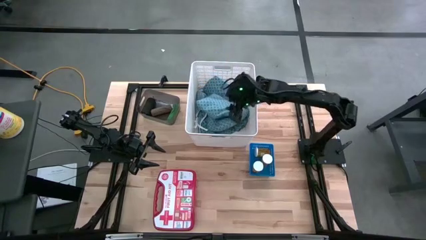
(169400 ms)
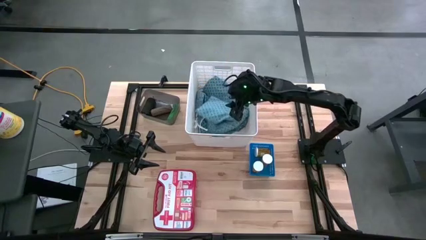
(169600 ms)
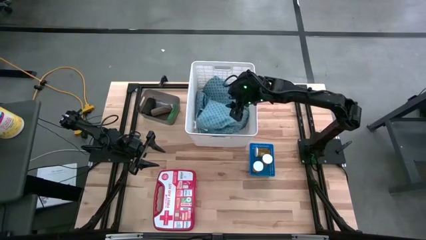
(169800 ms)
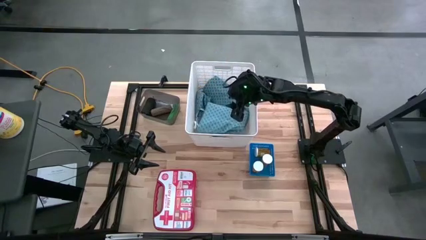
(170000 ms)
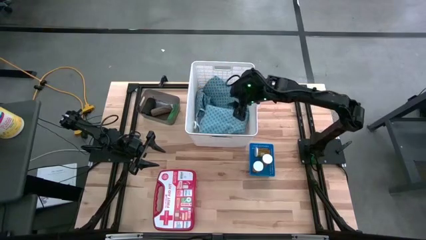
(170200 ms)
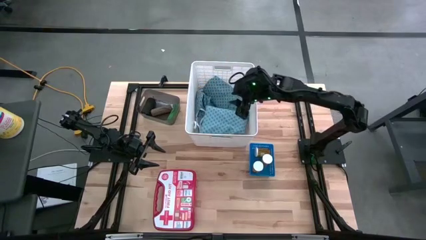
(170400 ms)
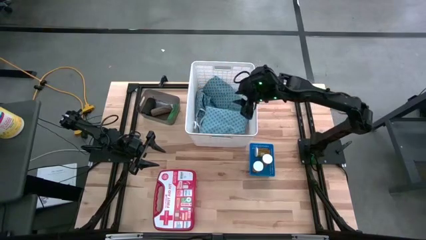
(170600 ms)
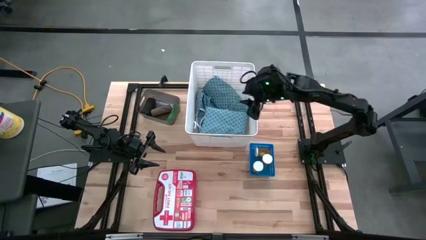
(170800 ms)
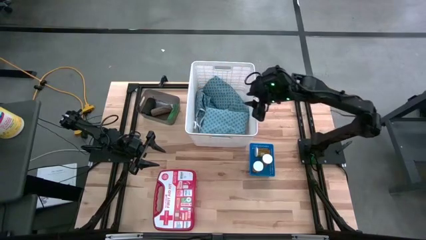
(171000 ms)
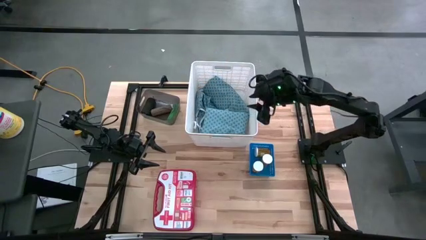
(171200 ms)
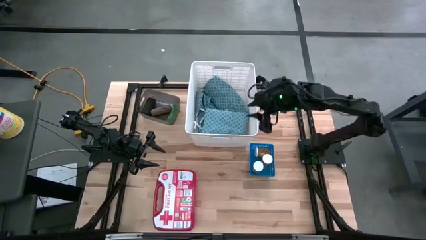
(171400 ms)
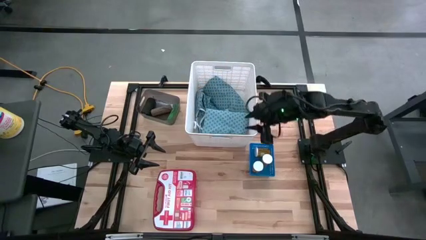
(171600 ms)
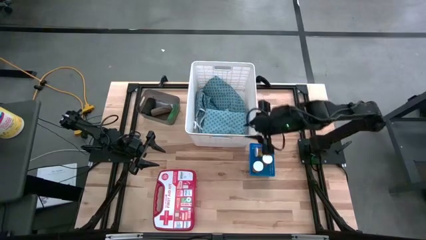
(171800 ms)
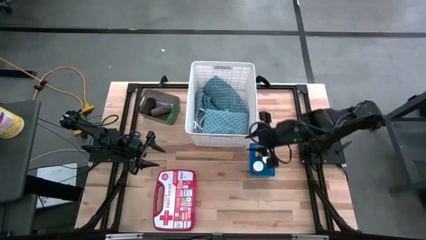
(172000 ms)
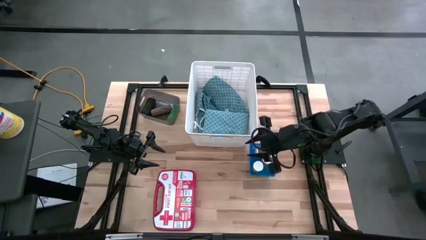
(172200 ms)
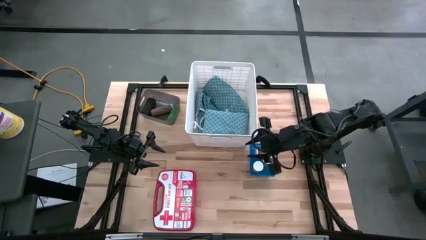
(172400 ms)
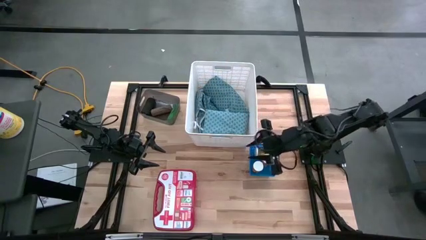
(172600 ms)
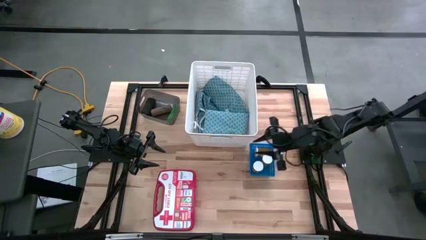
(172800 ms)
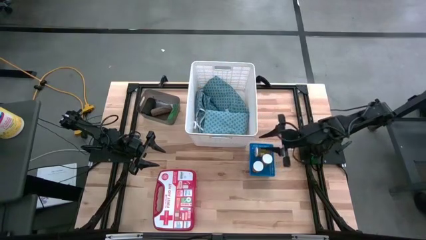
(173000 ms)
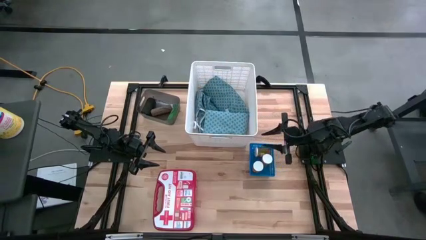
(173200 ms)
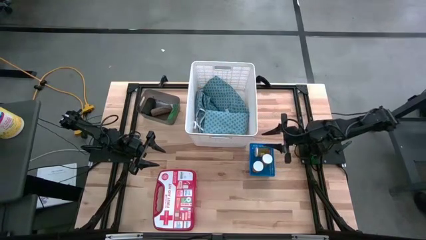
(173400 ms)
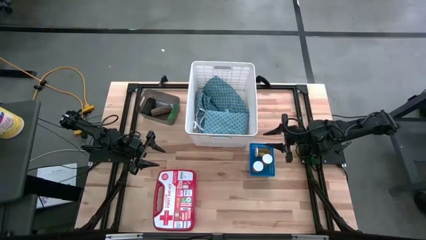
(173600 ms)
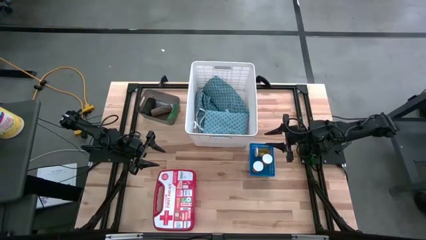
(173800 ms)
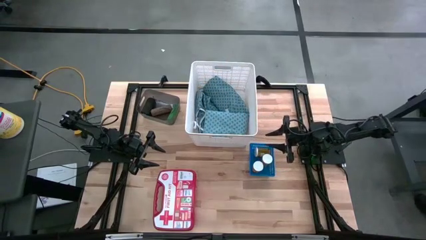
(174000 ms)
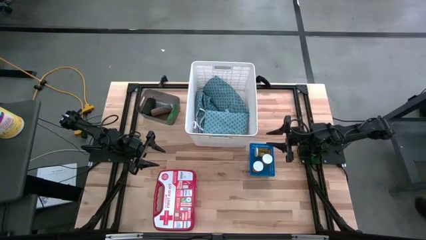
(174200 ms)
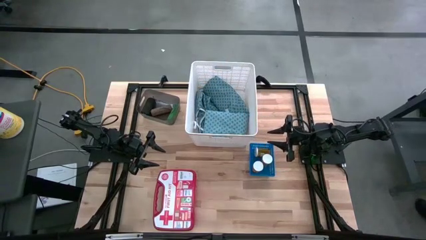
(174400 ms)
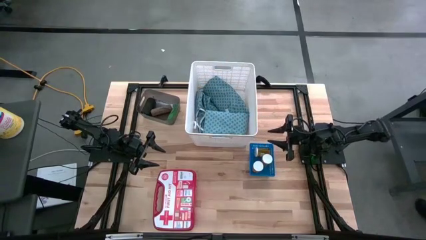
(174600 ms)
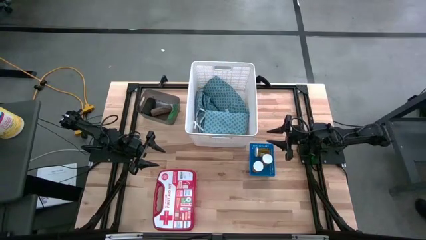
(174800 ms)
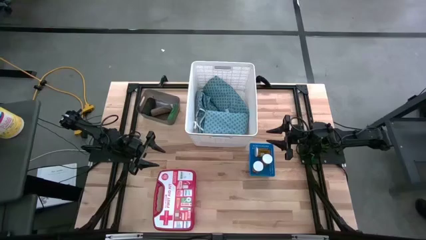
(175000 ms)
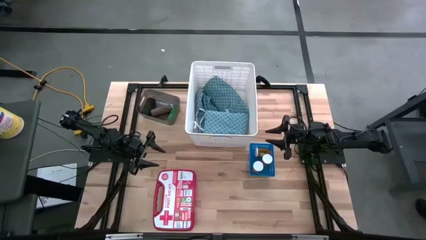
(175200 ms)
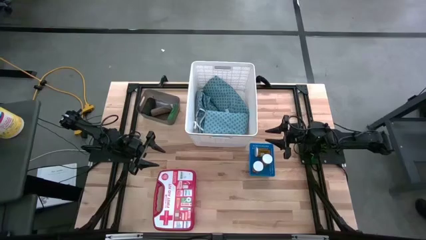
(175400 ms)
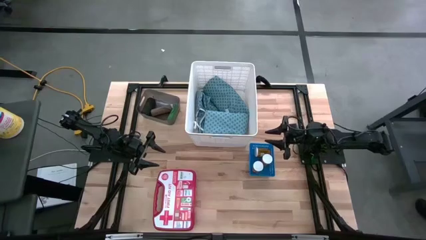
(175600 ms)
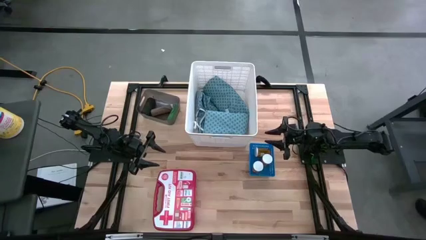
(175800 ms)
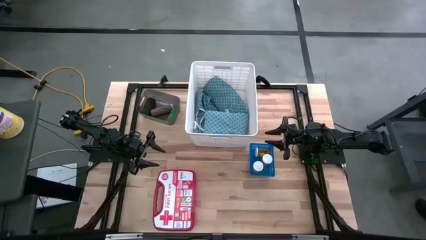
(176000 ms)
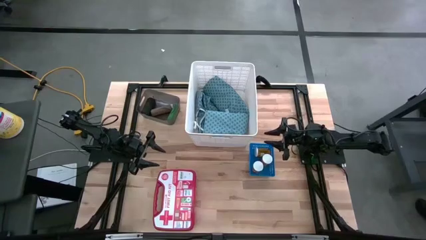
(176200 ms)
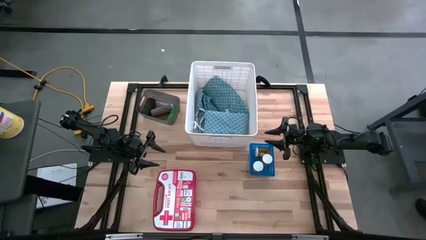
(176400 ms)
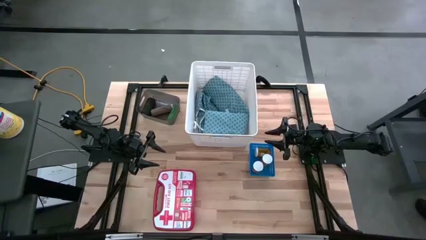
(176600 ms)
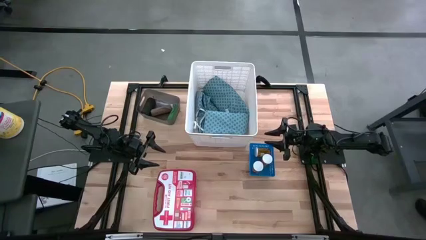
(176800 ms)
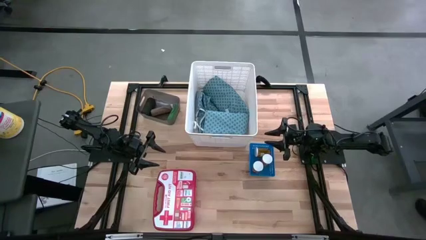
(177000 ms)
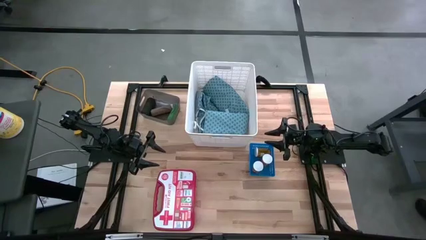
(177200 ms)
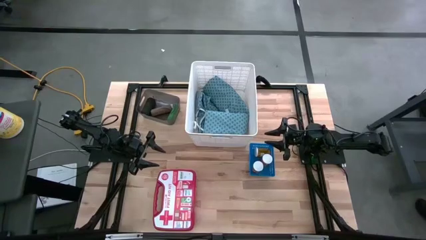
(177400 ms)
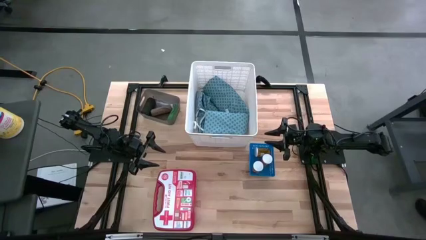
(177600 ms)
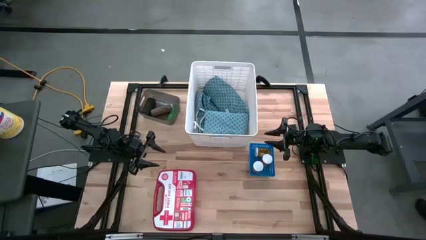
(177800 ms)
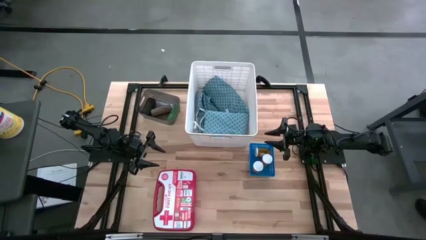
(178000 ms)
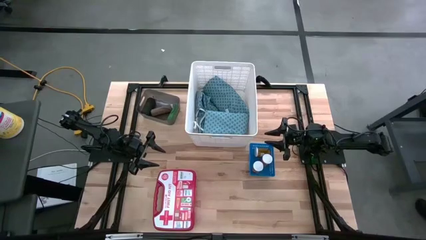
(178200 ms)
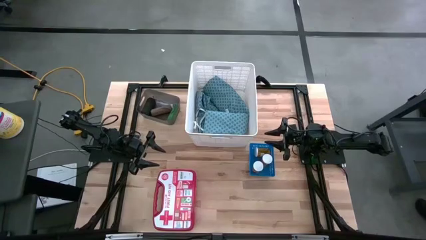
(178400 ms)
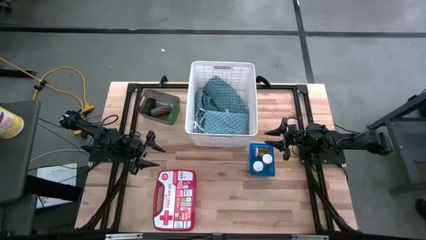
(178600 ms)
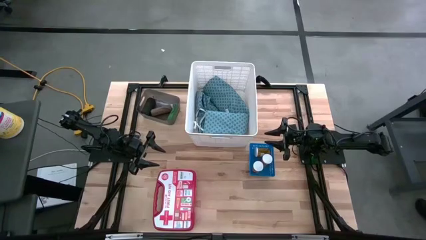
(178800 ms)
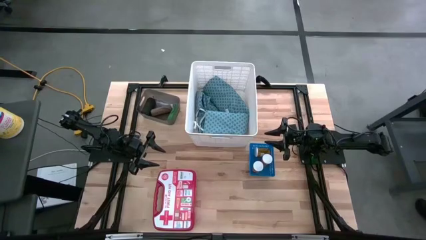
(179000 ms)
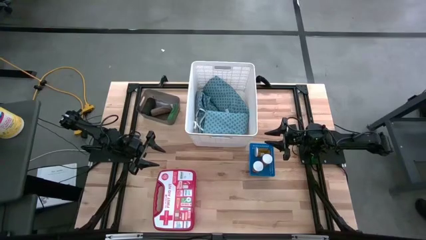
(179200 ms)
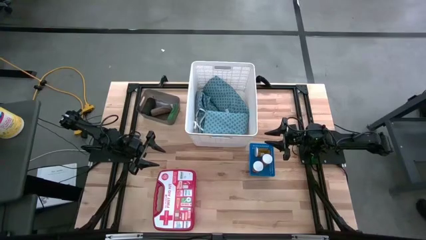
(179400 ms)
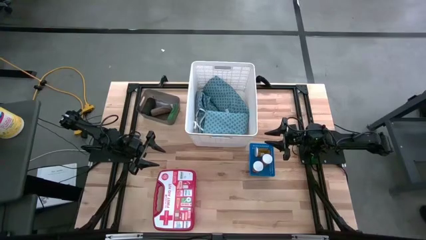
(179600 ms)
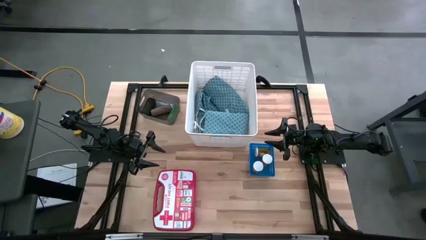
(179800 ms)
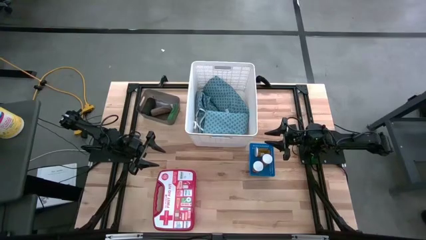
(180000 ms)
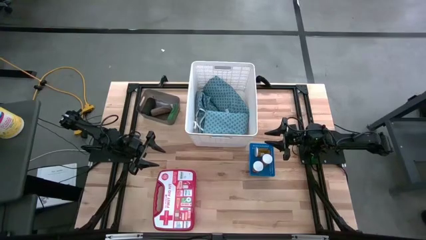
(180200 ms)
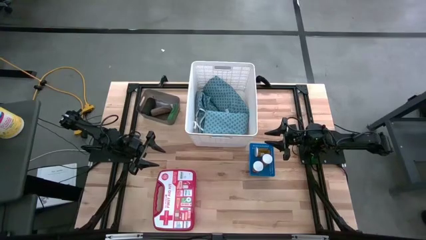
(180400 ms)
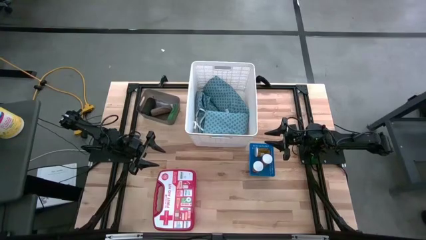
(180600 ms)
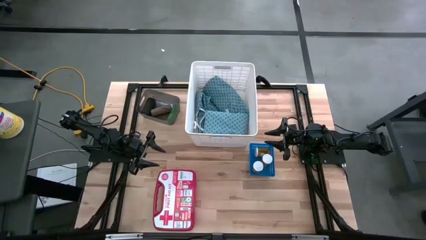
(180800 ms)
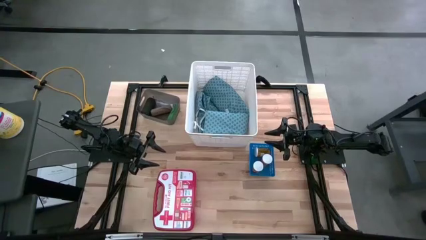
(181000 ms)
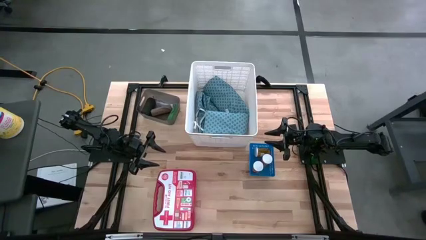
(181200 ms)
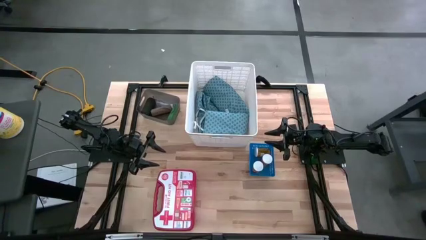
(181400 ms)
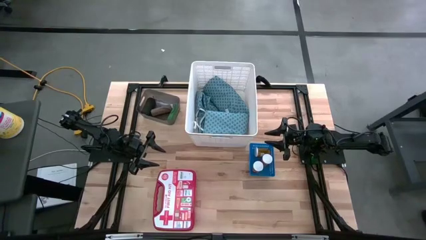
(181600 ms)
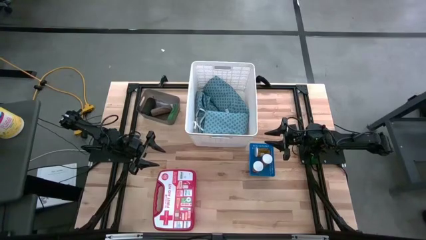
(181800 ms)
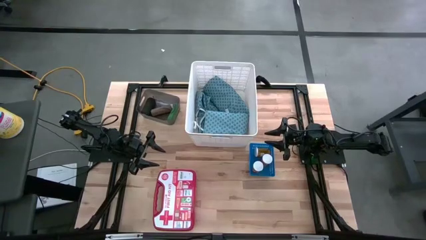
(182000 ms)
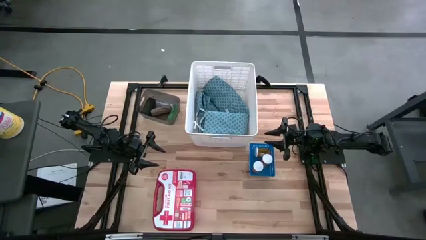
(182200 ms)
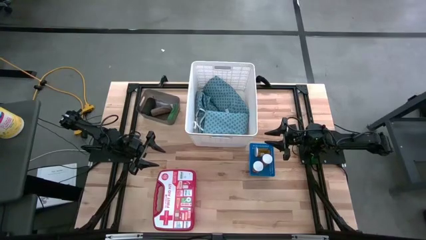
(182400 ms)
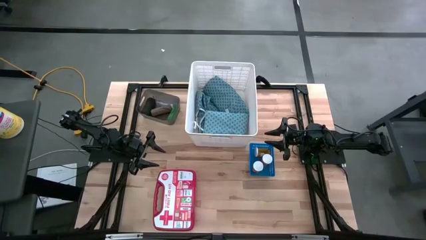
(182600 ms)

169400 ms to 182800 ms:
Task: Pick & place medical supplies in basket/bin
Return to Home Position

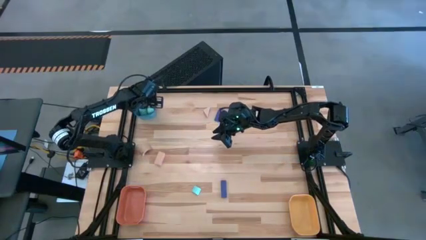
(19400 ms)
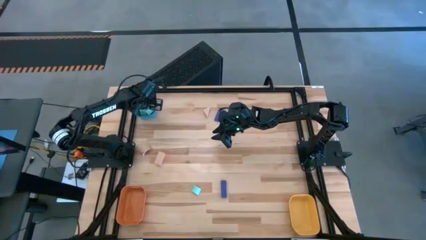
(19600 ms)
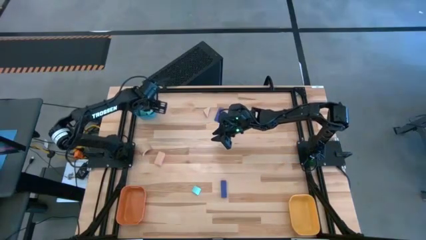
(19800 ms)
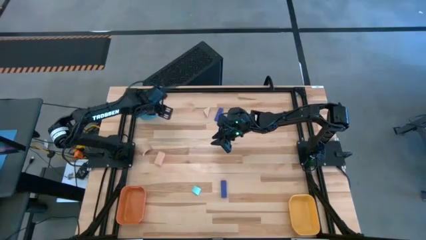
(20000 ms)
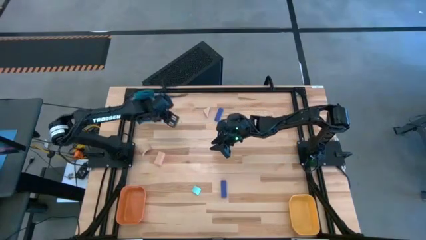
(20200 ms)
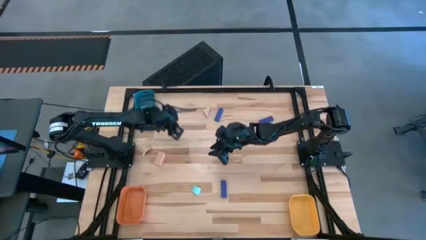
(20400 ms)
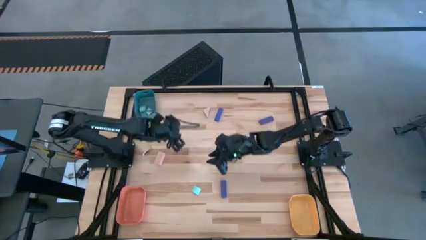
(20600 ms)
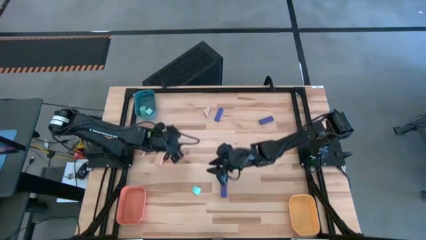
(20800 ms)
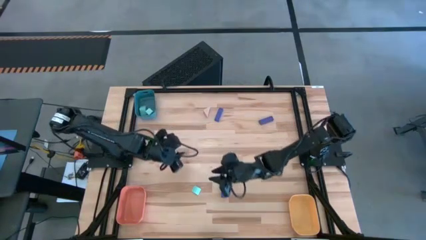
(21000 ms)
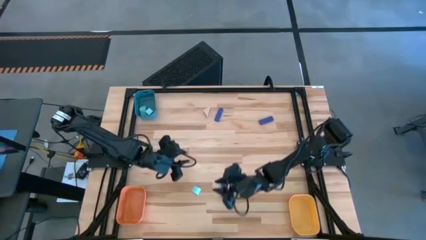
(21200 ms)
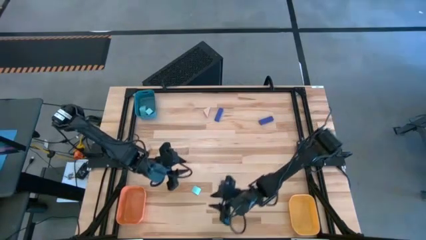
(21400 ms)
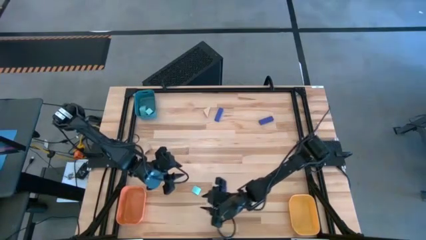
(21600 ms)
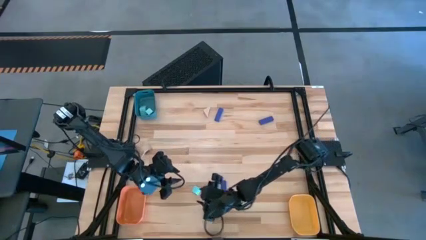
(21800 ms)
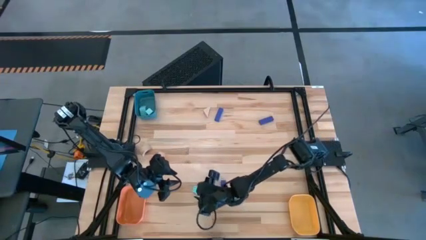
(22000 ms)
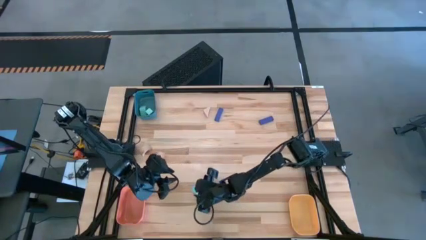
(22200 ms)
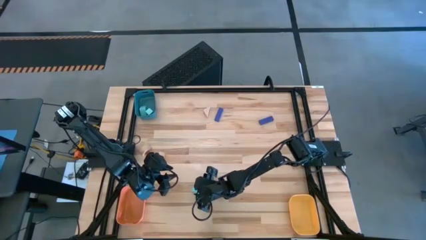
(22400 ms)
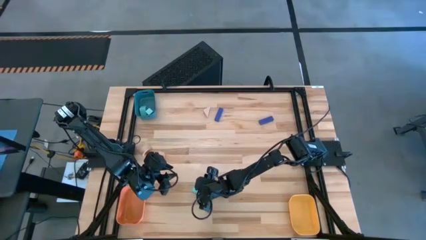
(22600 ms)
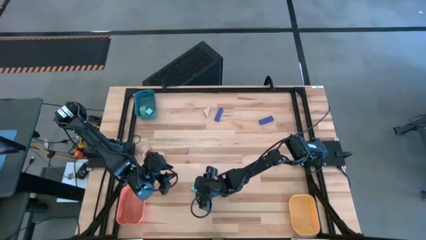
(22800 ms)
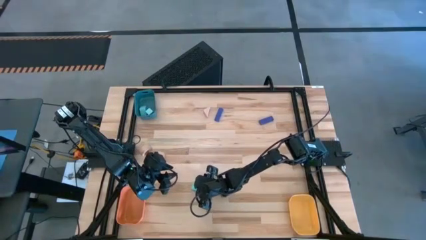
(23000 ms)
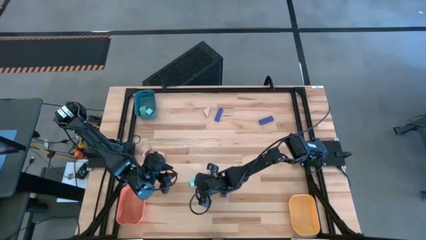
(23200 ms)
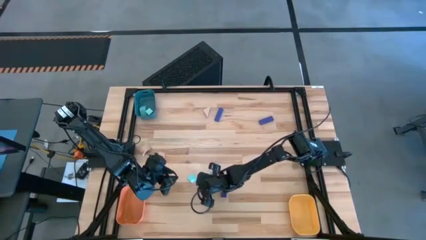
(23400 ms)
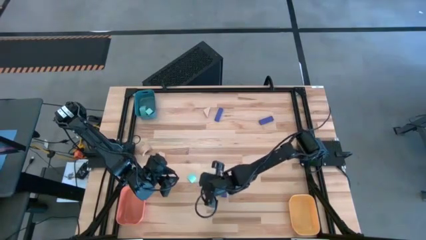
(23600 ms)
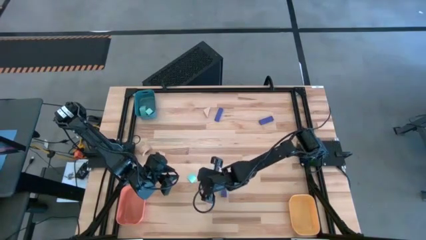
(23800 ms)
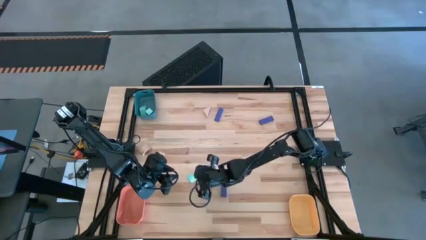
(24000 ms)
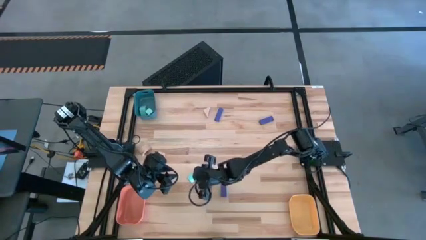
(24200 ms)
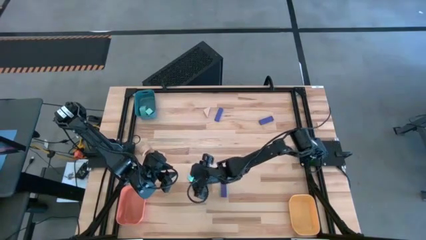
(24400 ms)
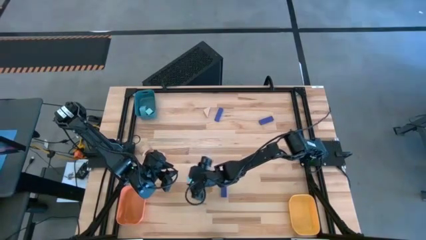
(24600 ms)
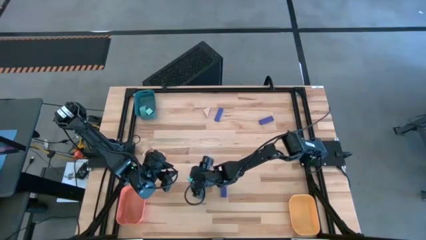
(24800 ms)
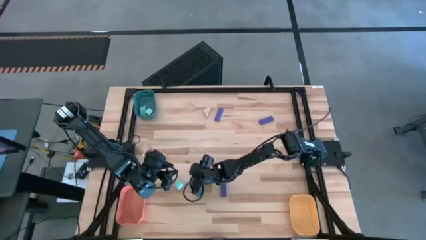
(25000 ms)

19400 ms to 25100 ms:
Task: Sort & place blocks by color
Put the light blue block into the blue bin
